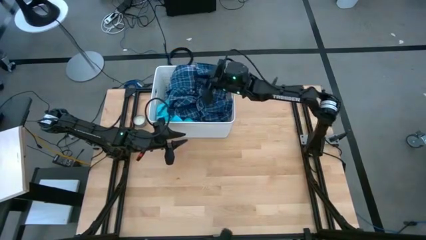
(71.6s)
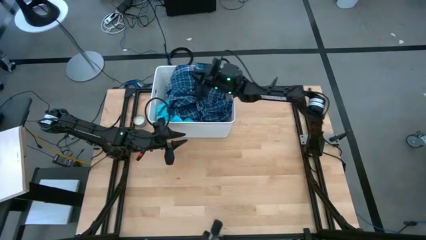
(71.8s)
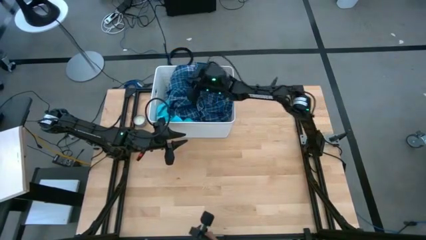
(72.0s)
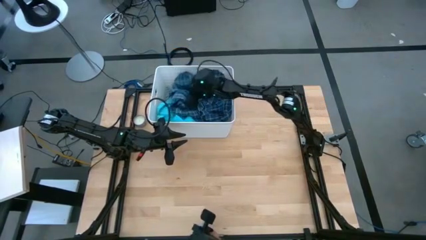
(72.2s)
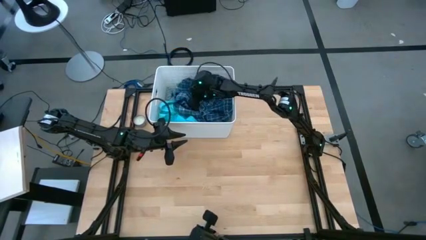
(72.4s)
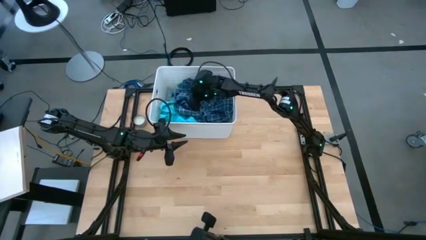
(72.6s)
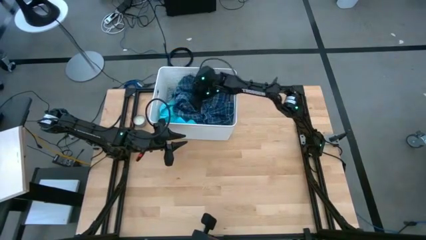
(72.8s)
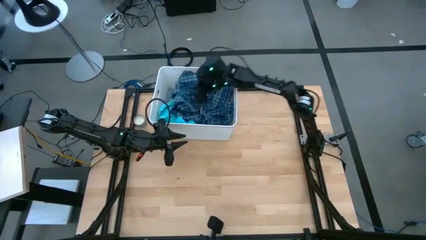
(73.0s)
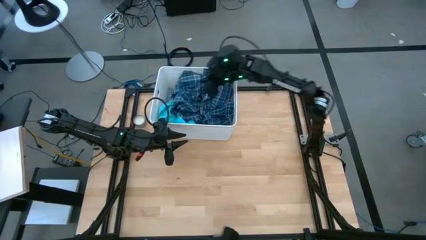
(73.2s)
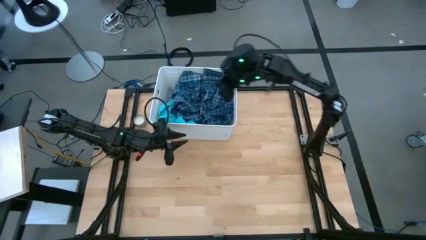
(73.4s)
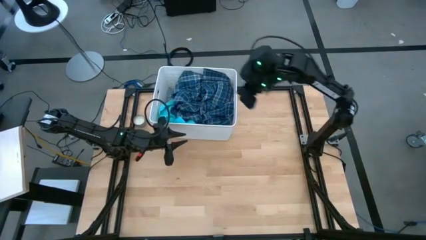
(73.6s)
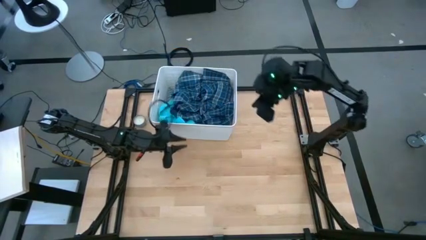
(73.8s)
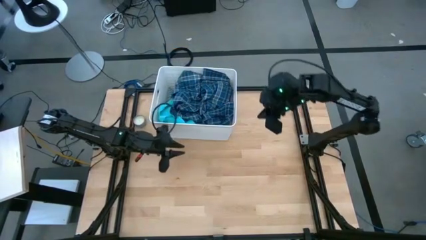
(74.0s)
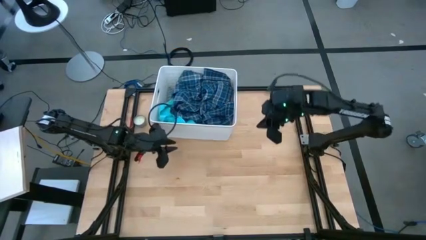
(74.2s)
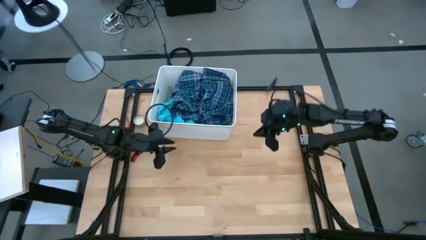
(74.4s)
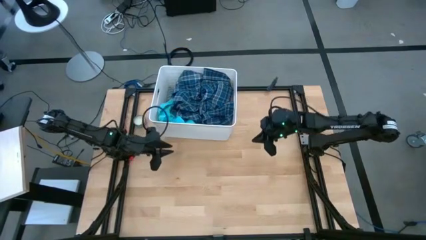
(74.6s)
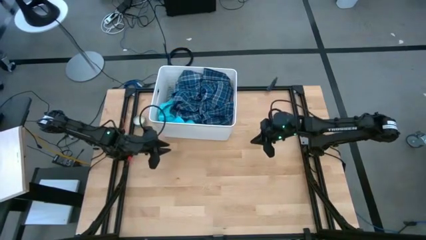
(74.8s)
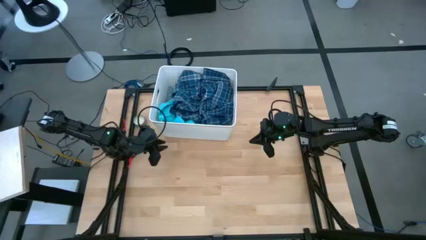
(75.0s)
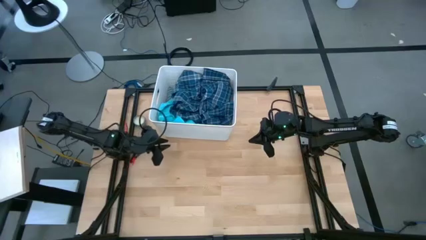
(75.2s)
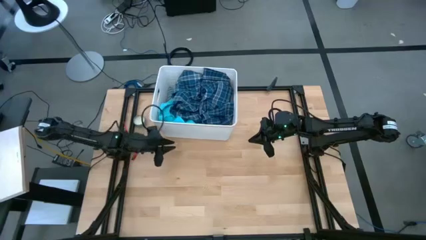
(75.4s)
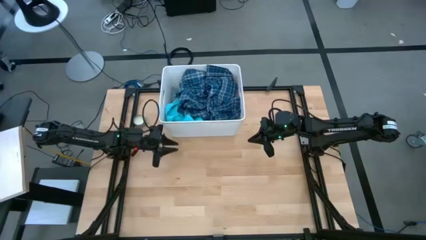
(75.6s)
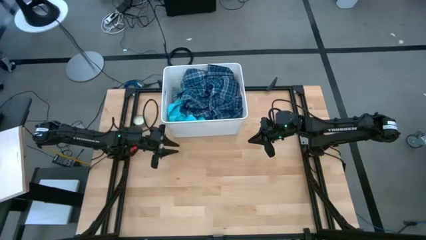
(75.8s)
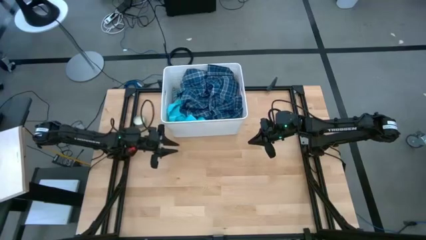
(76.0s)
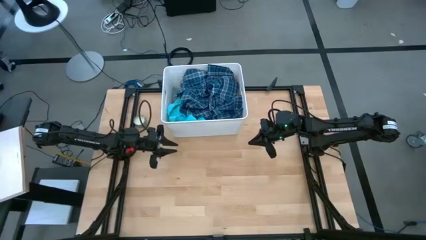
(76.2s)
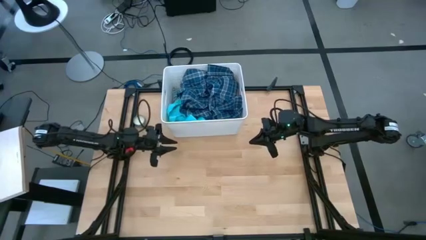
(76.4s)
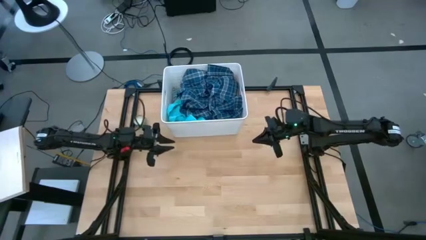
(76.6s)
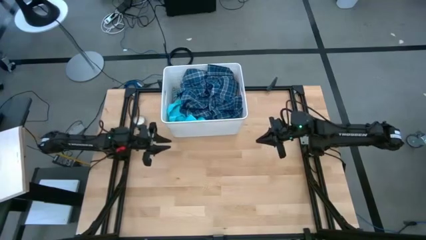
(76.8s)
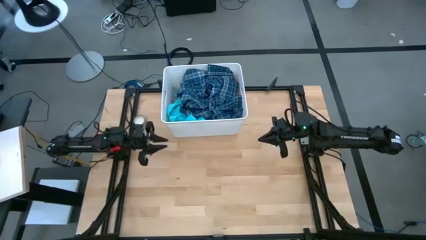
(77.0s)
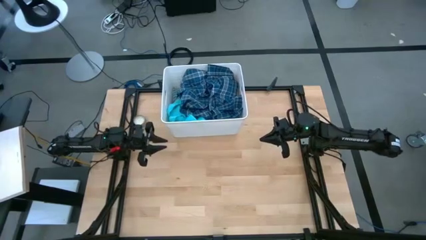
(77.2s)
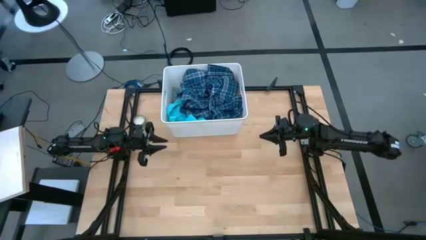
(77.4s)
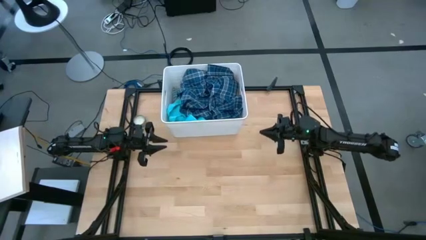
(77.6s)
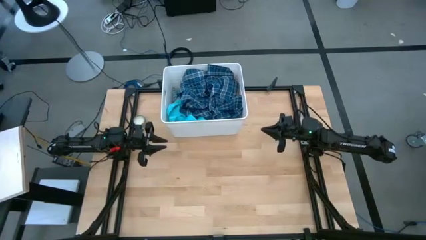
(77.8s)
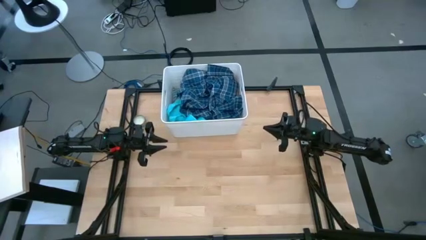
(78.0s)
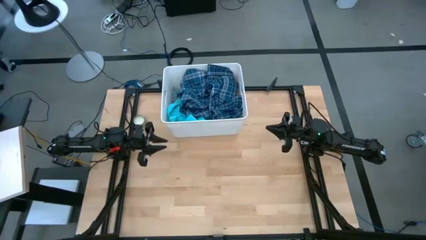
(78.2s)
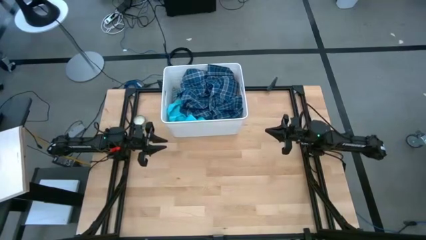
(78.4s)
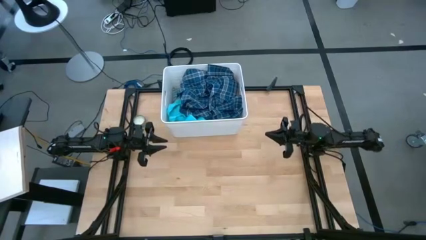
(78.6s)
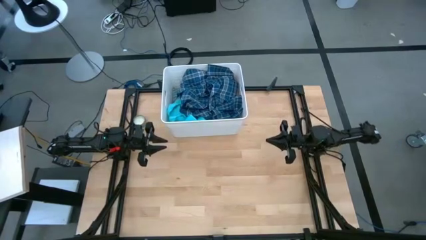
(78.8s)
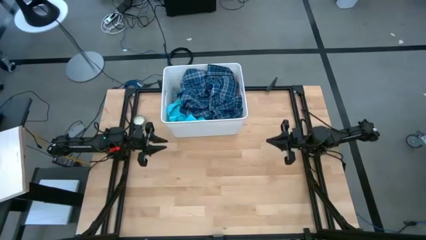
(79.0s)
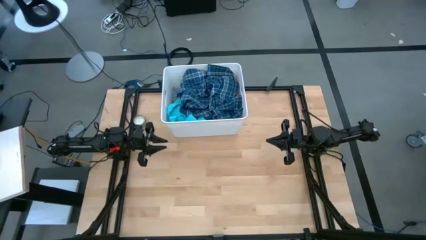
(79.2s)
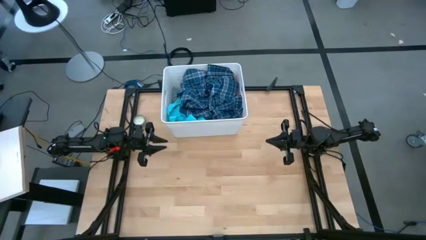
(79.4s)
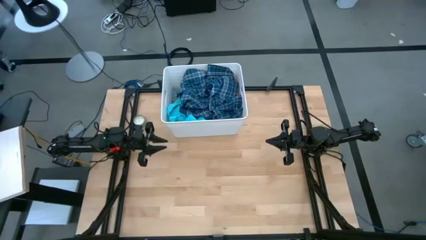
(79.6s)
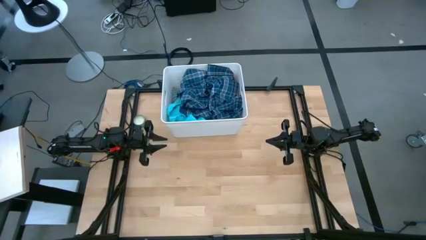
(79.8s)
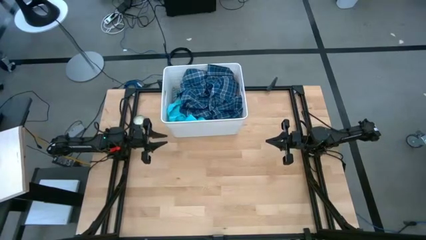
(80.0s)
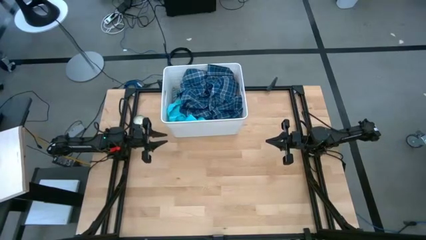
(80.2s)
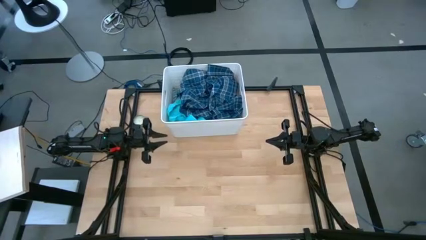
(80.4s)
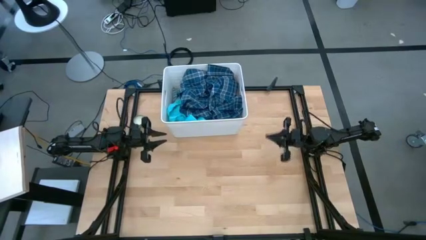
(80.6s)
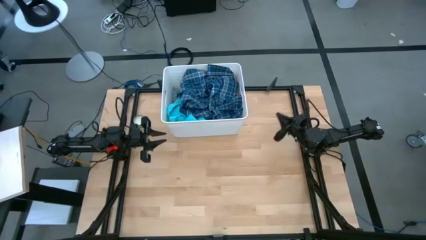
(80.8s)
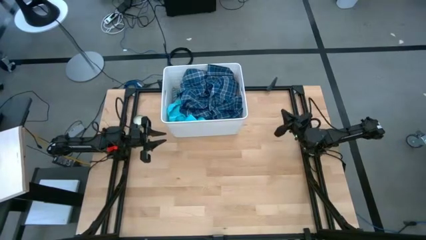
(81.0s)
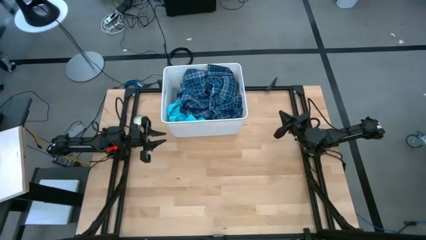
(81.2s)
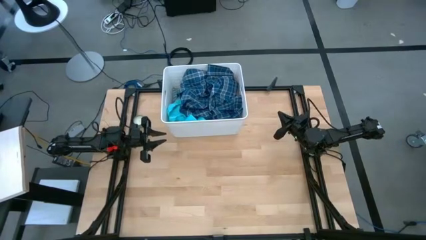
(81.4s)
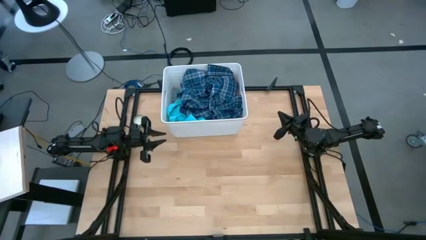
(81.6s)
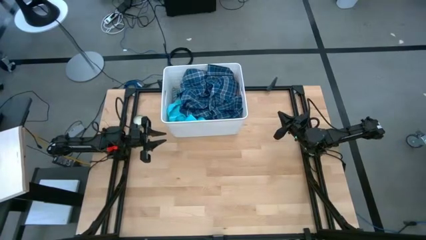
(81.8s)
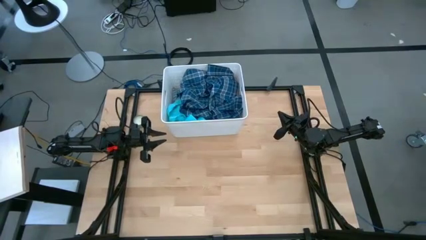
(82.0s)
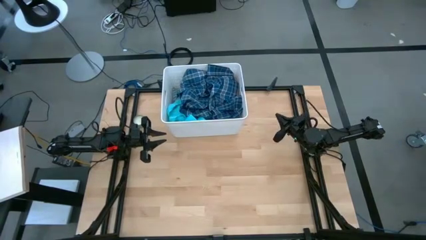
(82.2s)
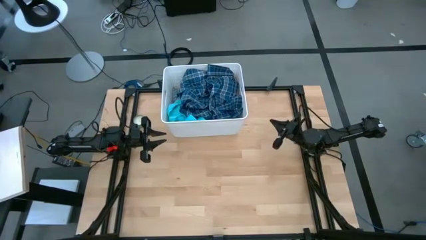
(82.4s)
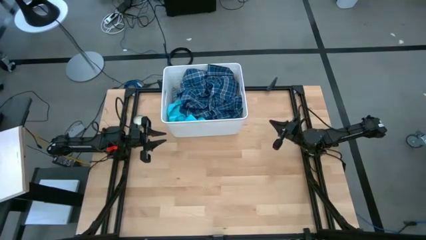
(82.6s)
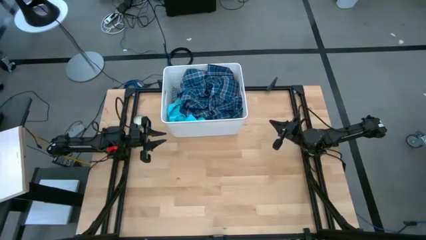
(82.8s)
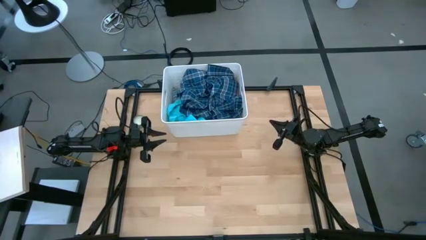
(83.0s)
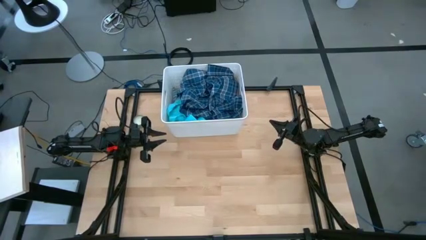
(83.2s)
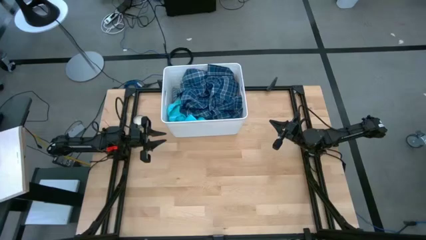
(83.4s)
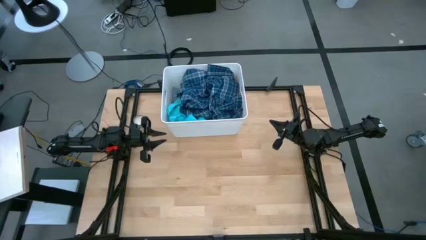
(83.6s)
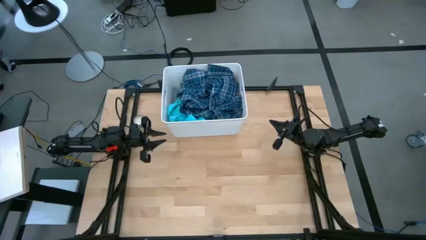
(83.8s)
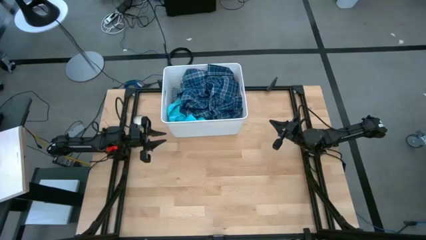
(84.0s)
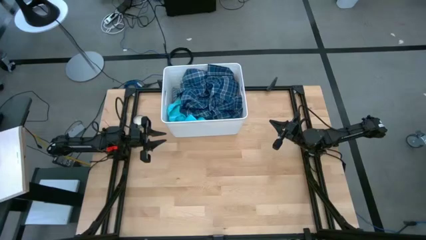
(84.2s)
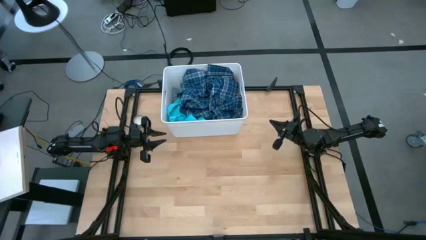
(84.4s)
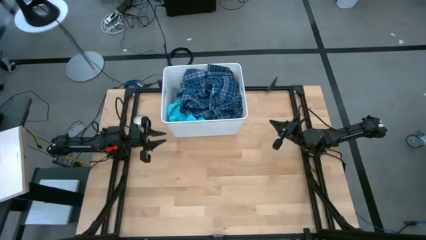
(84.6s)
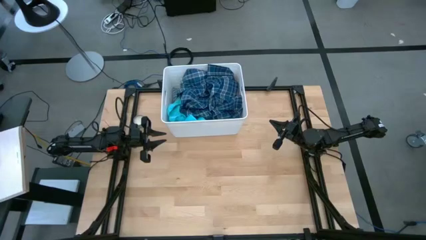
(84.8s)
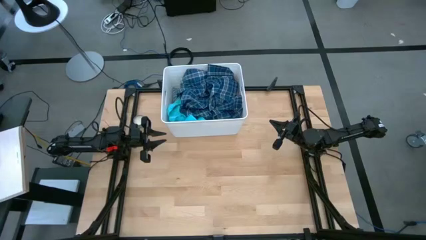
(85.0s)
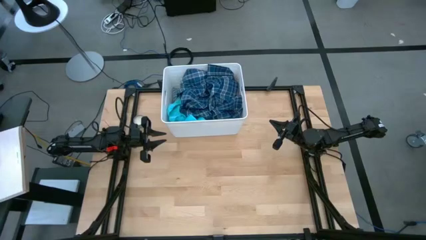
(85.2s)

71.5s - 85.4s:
Task: Sort clothes
Return to Home Position

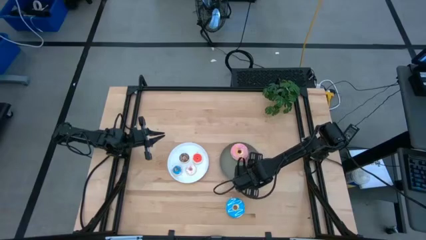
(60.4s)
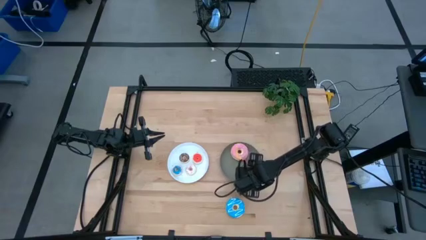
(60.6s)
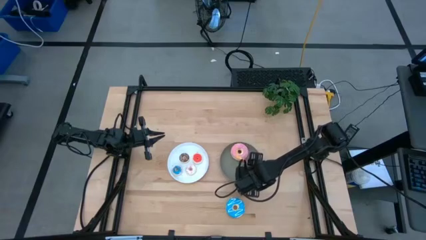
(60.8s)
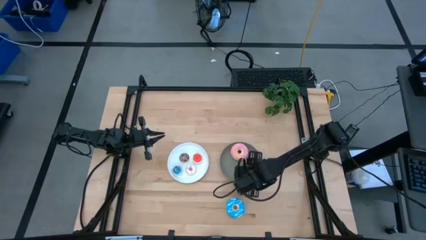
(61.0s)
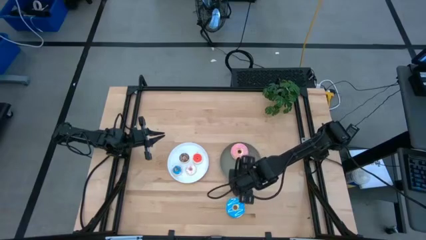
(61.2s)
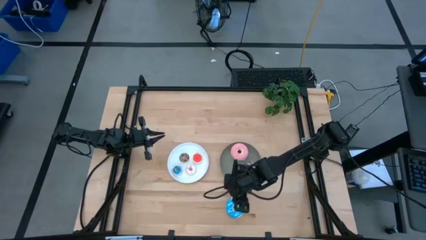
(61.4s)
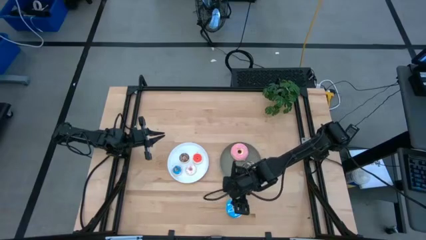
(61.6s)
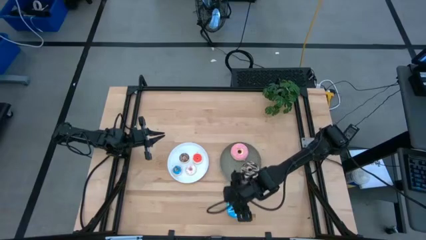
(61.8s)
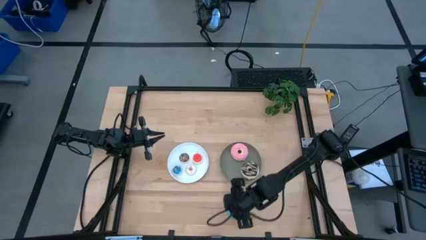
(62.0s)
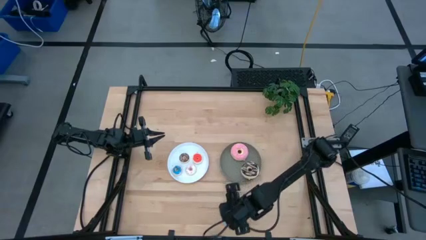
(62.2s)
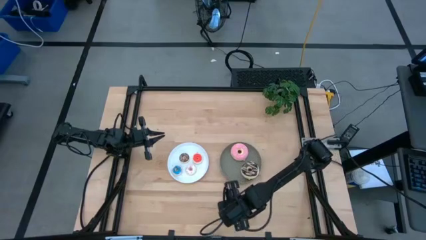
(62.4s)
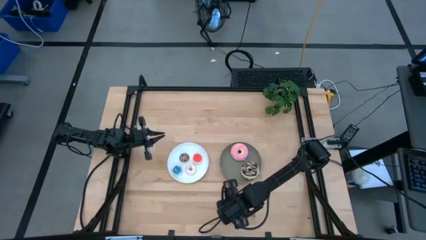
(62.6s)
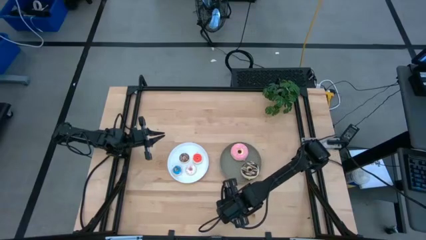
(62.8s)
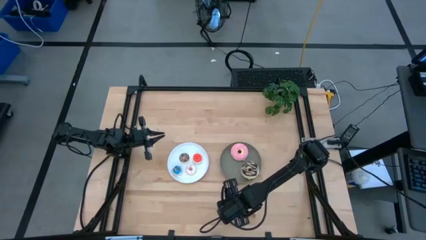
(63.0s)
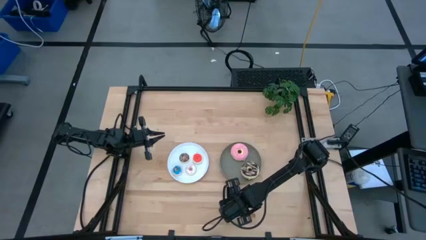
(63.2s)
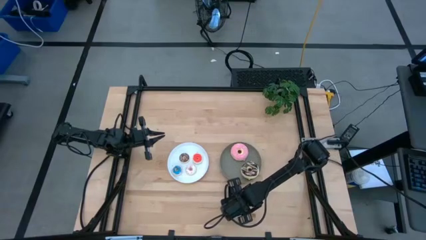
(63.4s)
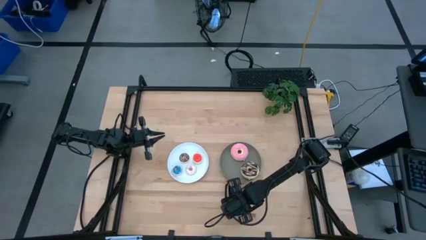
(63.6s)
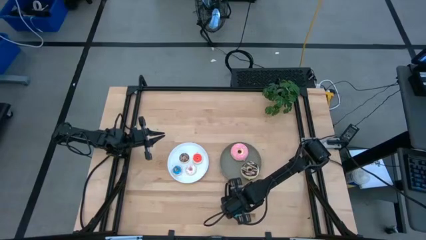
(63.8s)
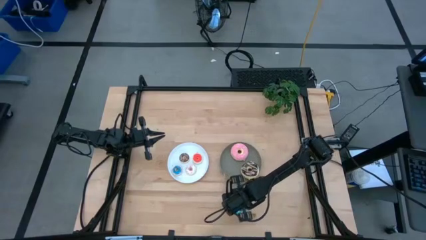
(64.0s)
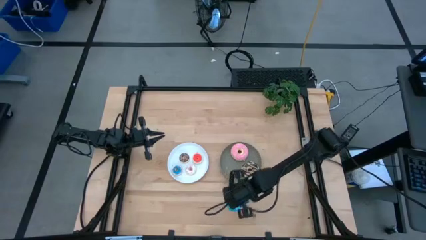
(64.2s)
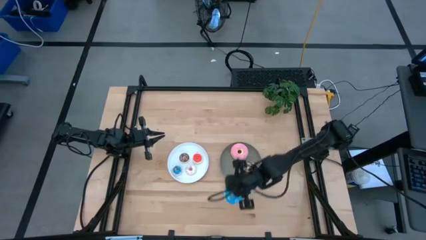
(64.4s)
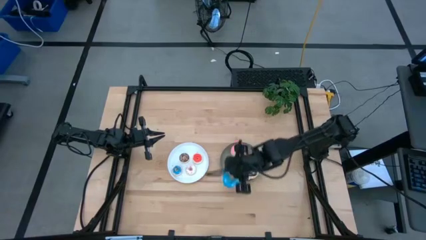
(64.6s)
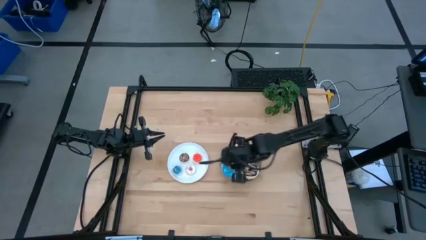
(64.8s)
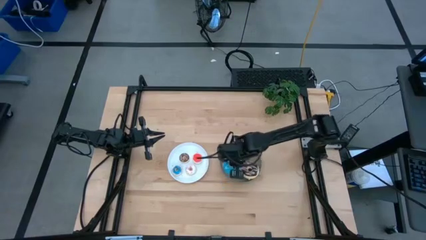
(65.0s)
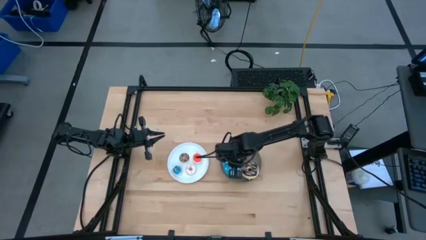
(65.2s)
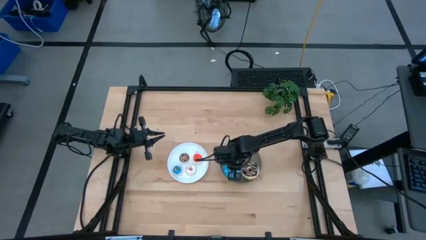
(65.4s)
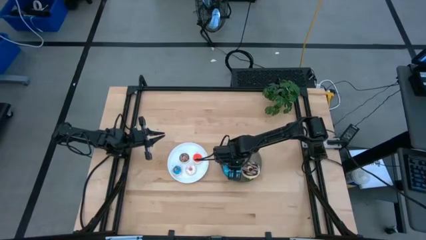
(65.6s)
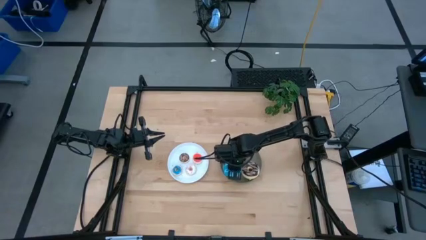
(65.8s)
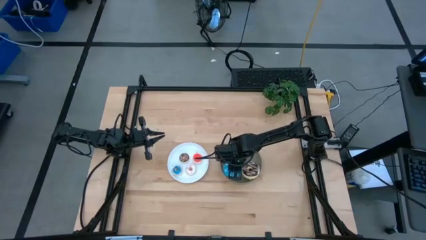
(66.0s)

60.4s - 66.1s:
Task: Pick & Place donuts
Put the big blue donut on the gray plate
